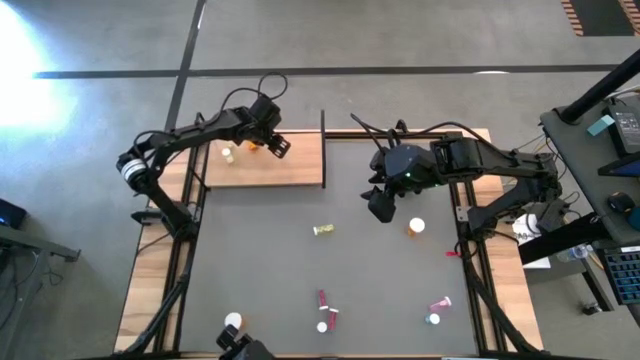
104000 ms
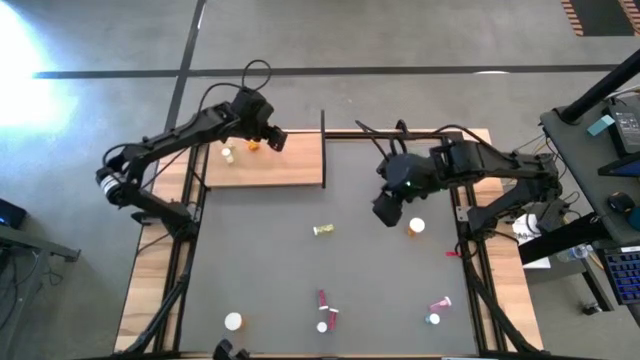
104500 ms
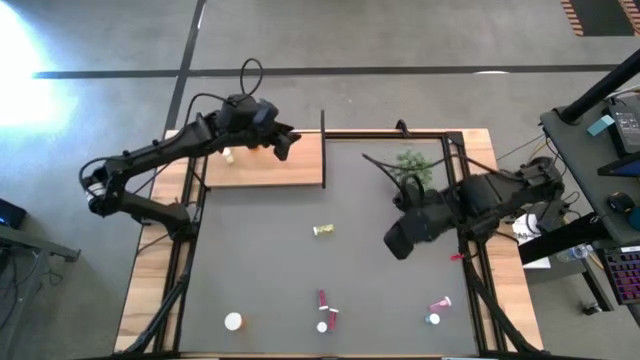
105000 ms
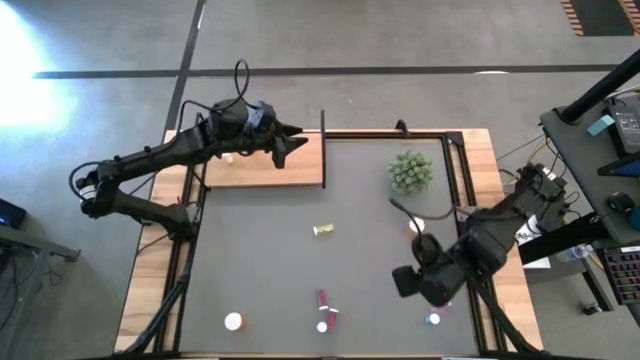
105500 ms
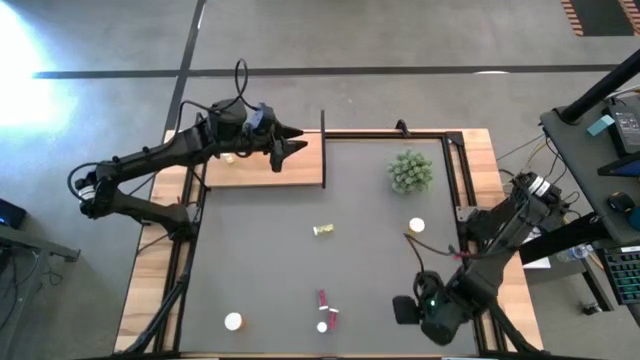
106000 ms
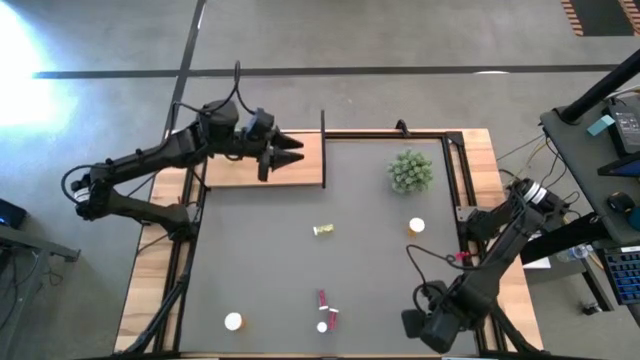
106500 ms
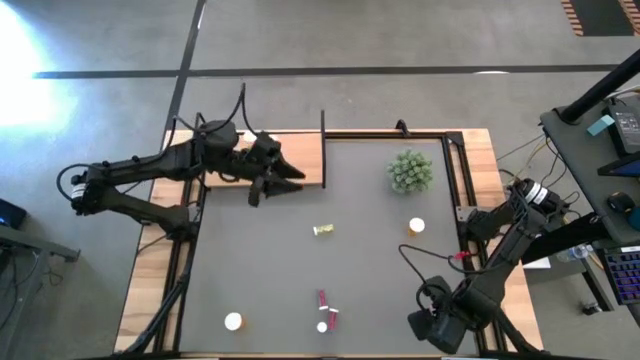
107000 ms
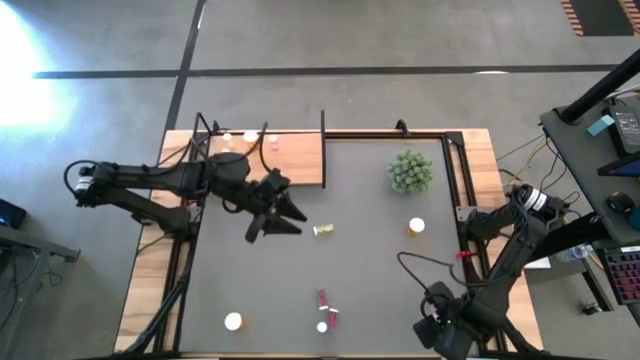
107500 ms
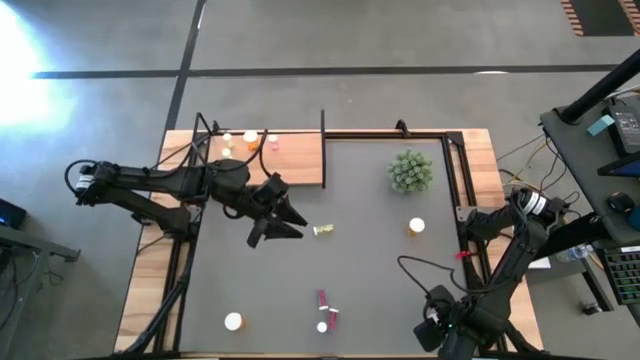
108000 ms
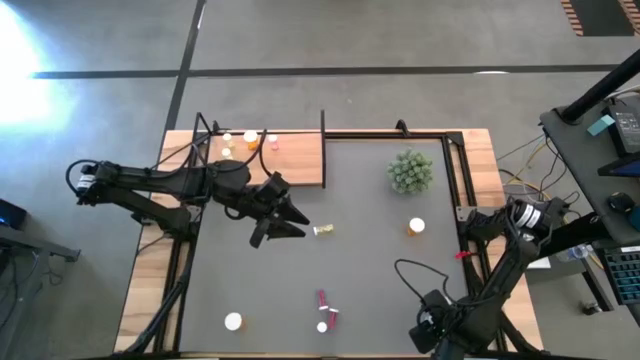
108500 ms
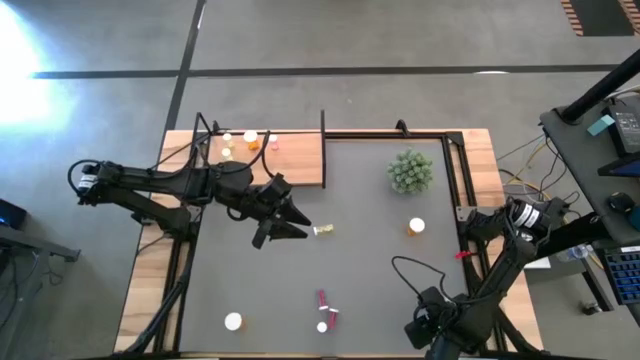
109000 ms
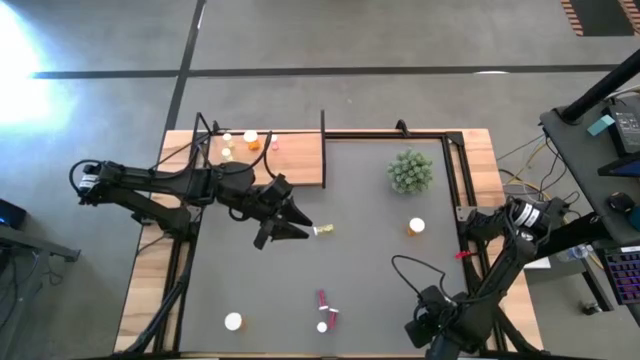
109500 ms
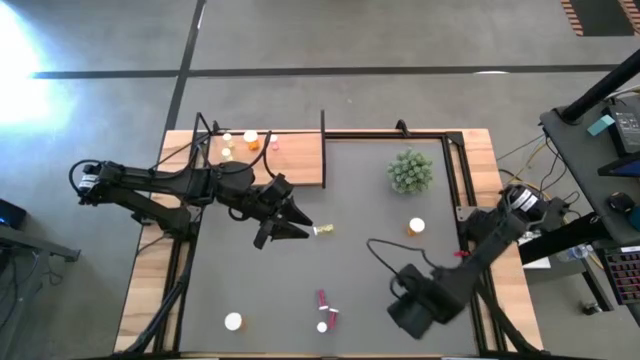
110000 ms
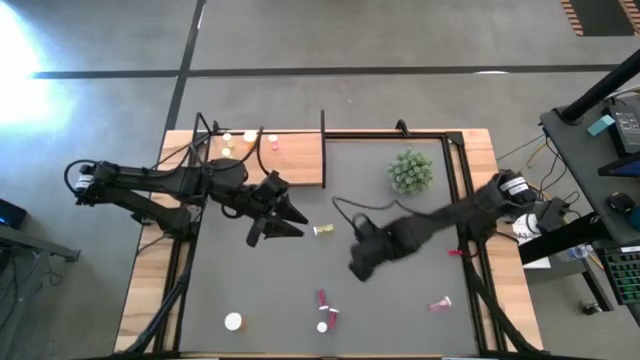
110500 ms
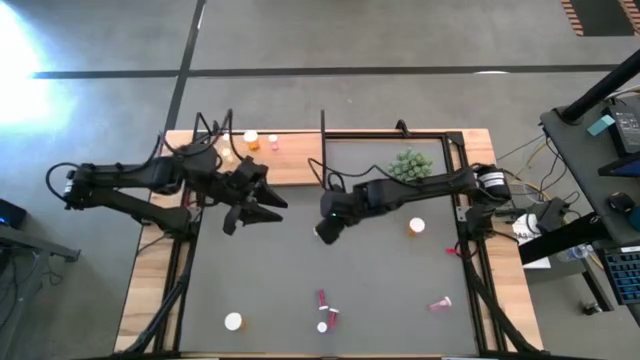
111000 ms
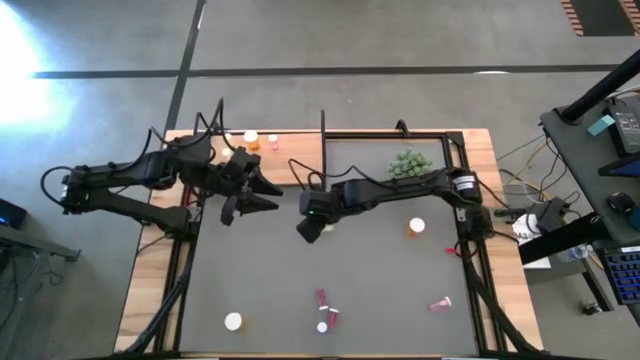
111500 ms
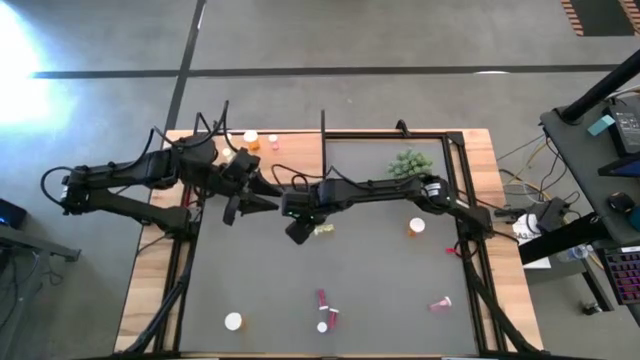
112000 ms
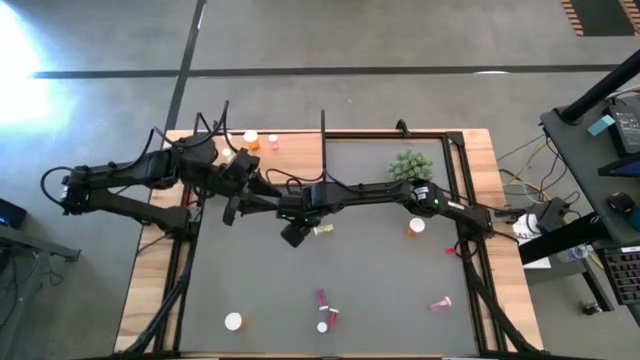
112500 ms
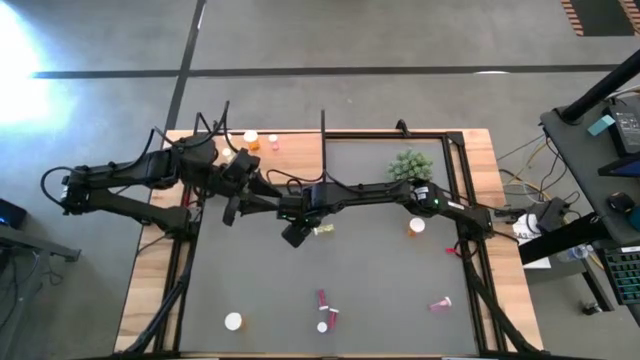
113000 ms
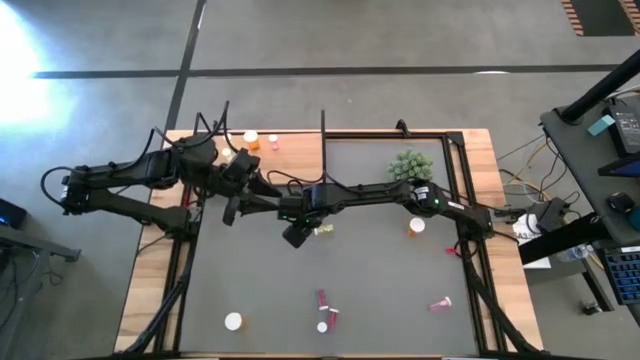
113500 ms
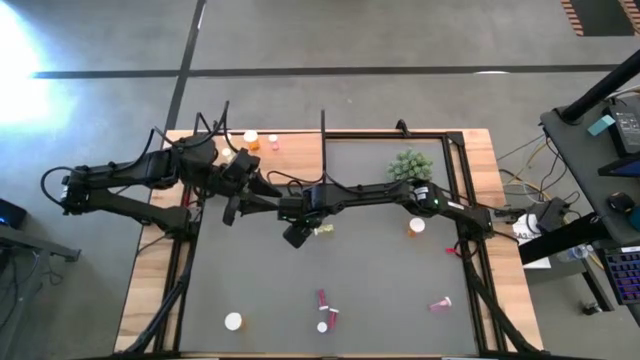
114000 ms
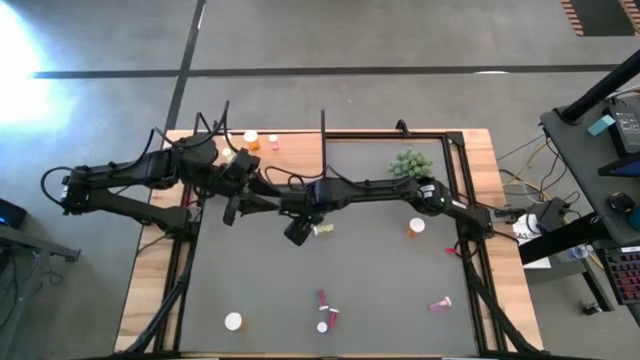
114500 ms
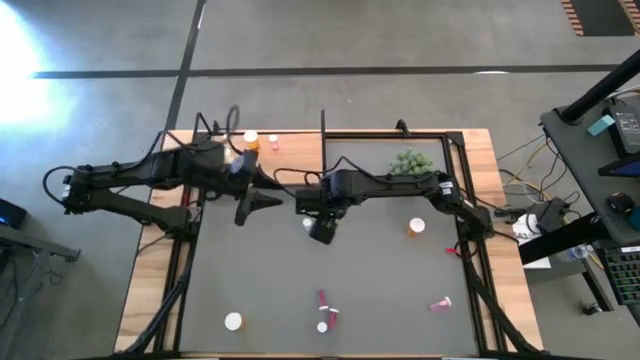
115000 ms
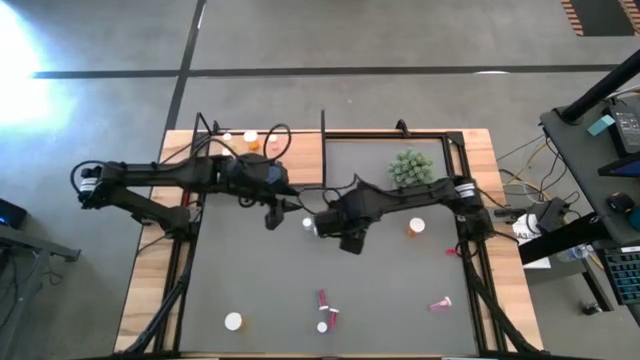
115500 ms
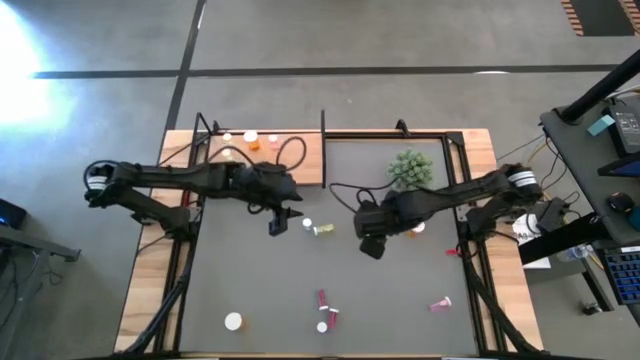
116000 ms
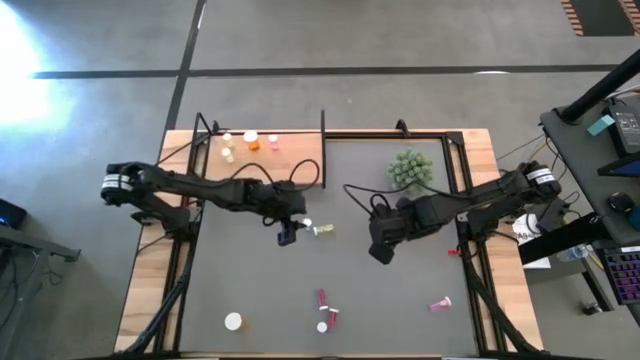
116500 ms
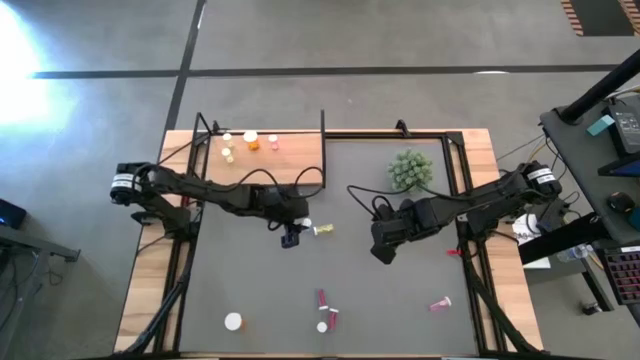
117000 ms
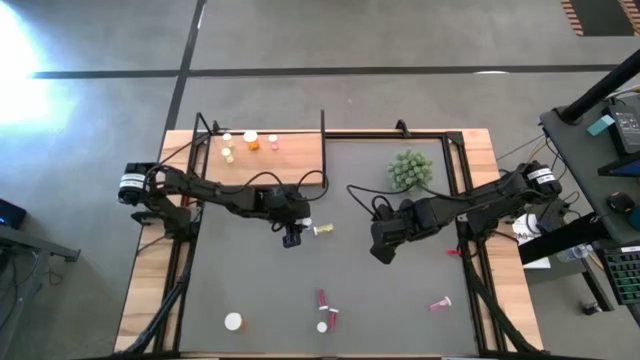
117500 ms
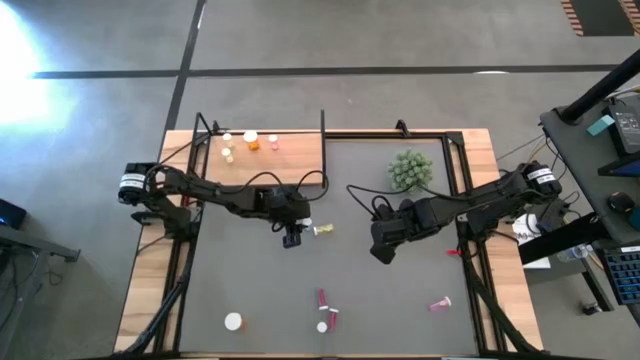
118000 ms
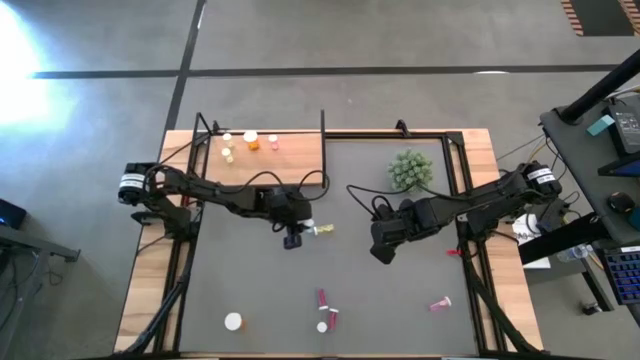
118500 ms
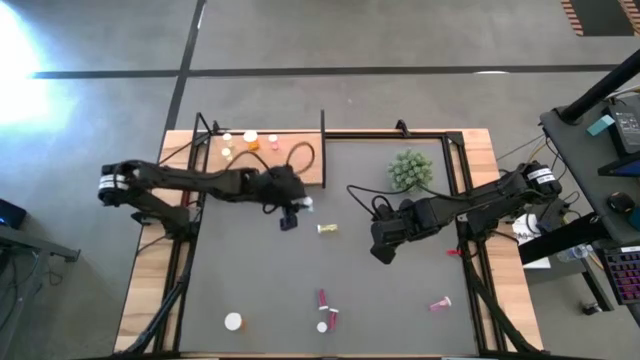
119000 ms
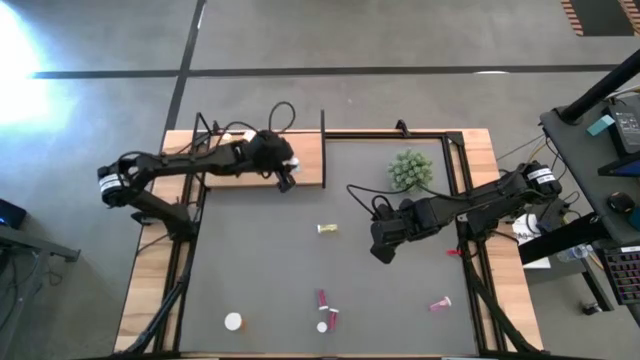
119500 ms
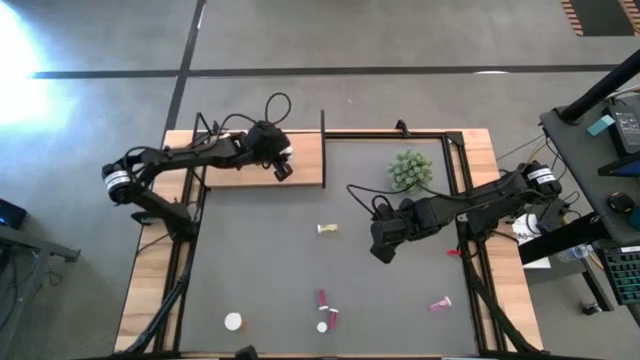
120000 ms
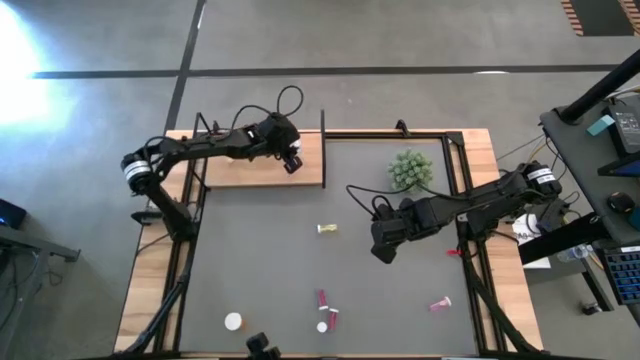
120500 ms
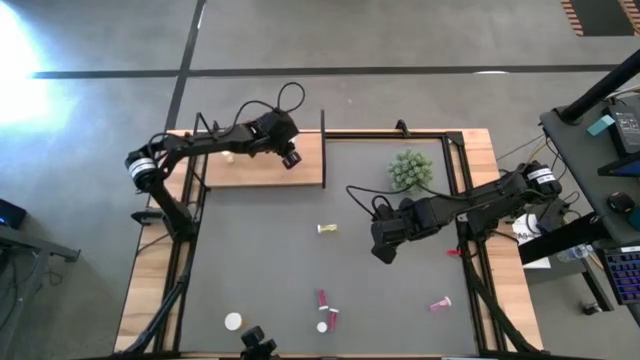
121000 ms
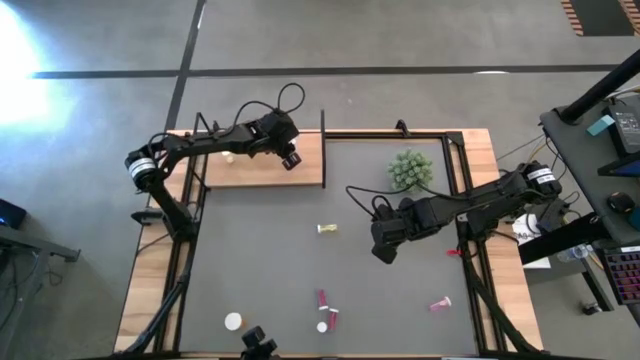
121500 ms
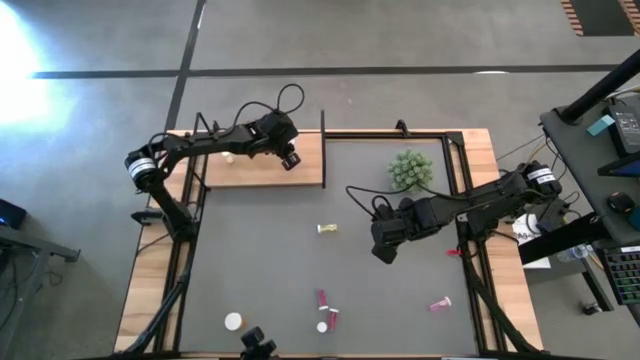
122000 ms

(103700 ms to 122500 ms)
Task: Pick and place medicine bottles onto shelf by color
Put the bottom right blue pill bottle on the shelf
